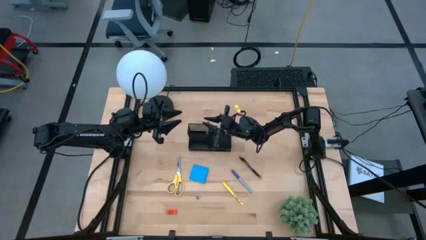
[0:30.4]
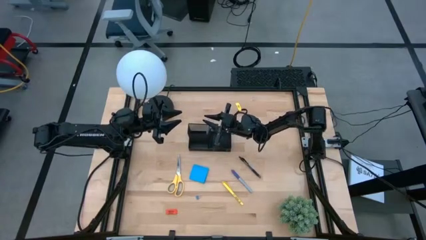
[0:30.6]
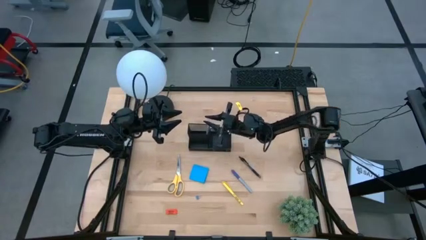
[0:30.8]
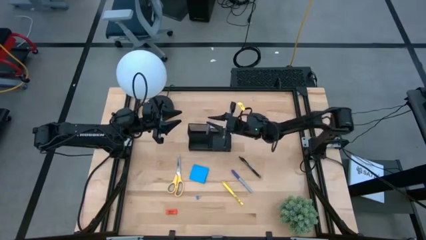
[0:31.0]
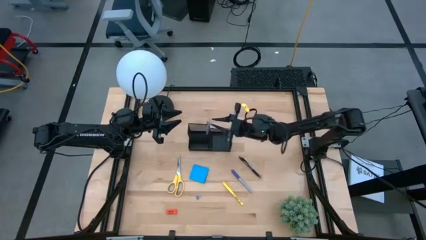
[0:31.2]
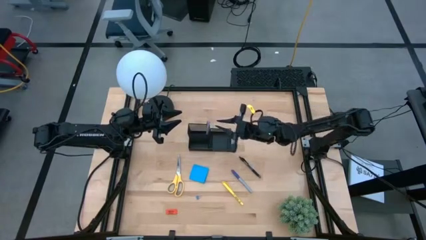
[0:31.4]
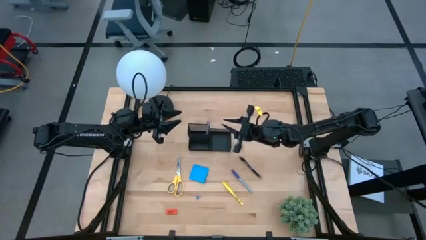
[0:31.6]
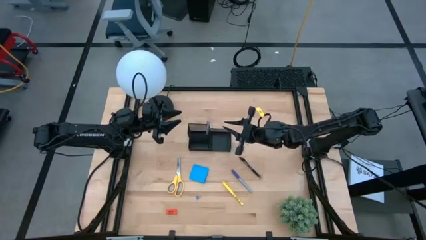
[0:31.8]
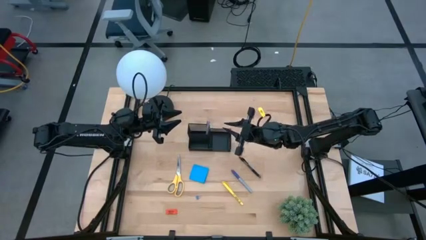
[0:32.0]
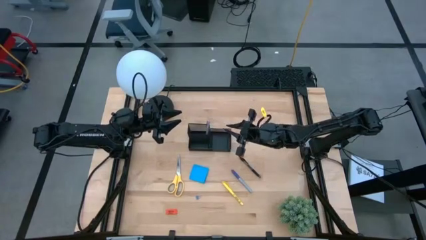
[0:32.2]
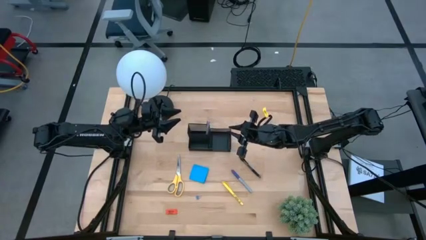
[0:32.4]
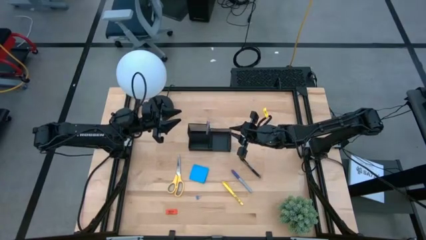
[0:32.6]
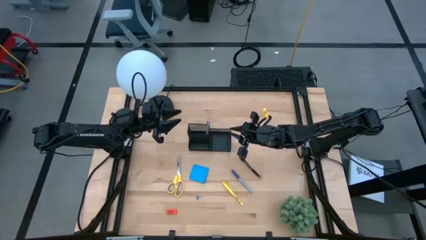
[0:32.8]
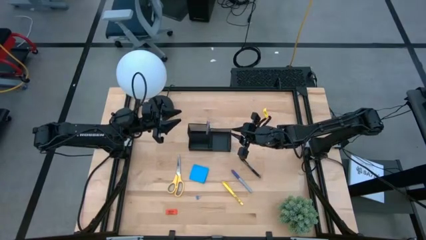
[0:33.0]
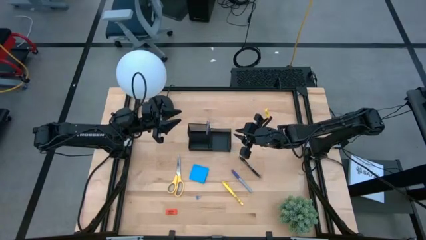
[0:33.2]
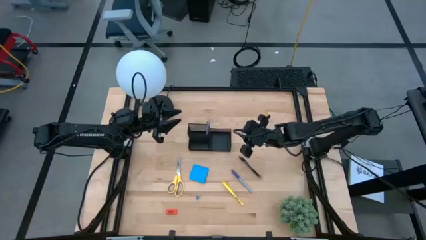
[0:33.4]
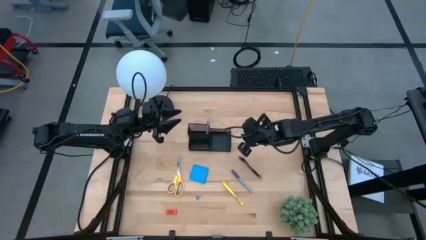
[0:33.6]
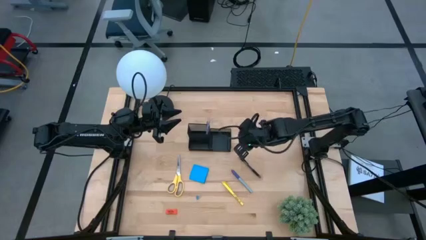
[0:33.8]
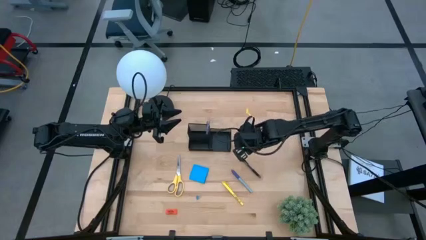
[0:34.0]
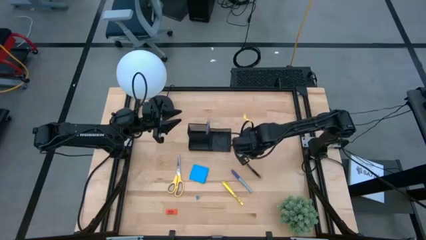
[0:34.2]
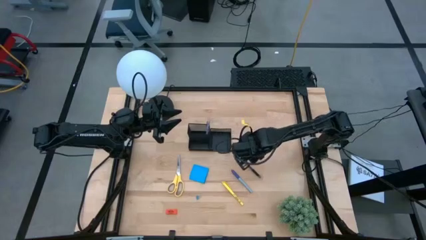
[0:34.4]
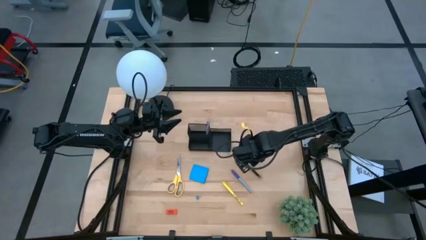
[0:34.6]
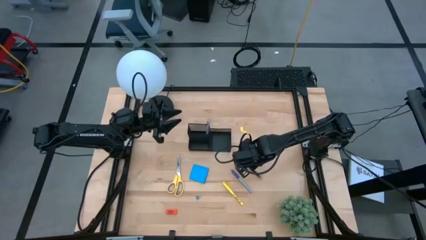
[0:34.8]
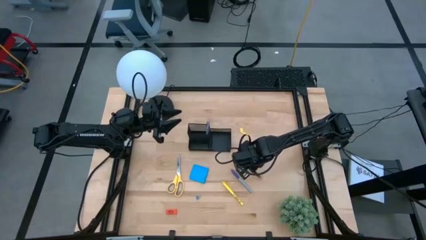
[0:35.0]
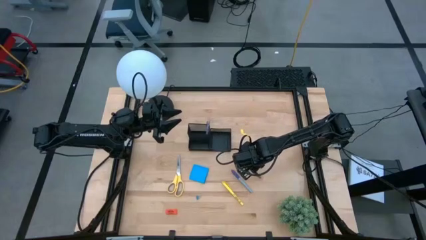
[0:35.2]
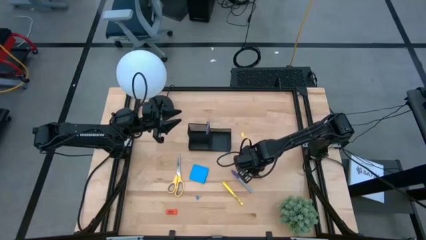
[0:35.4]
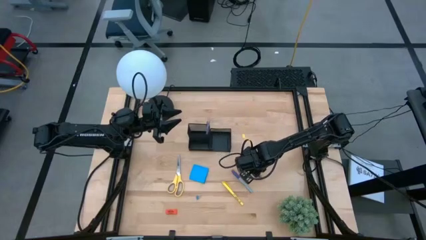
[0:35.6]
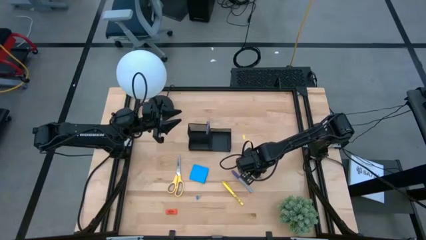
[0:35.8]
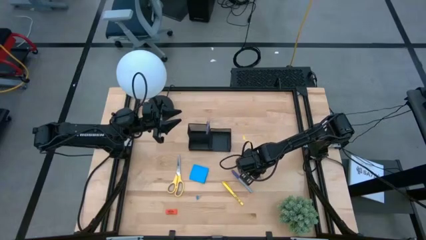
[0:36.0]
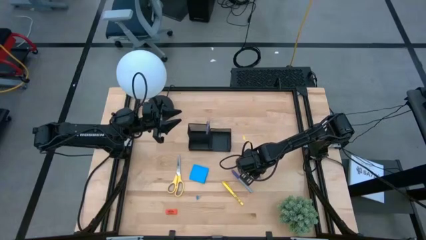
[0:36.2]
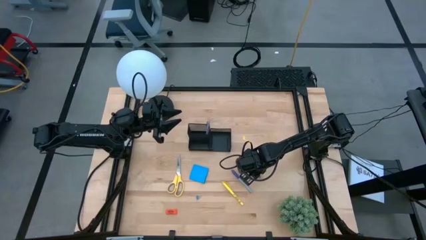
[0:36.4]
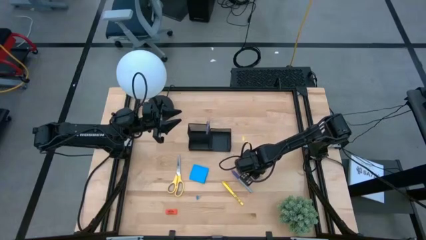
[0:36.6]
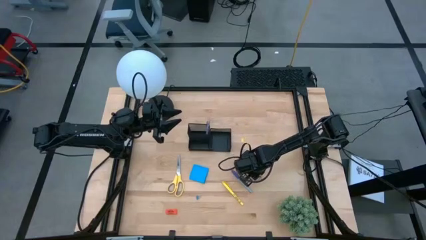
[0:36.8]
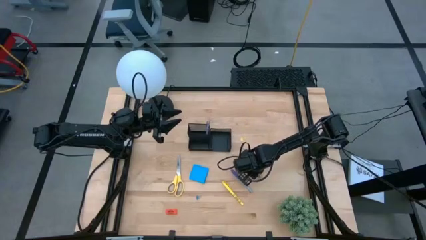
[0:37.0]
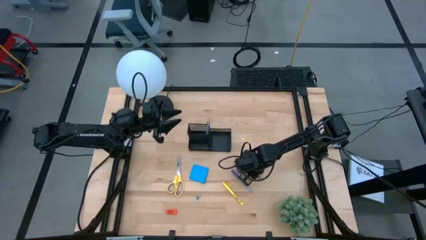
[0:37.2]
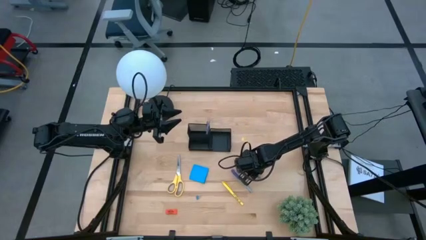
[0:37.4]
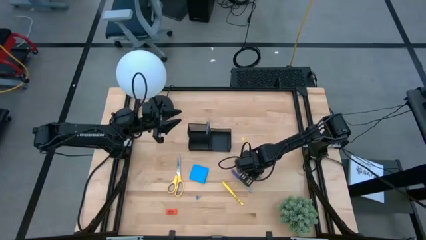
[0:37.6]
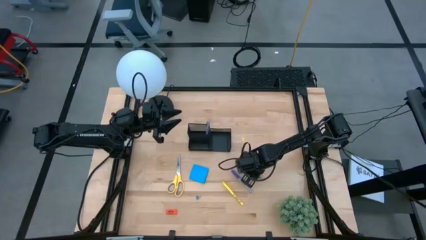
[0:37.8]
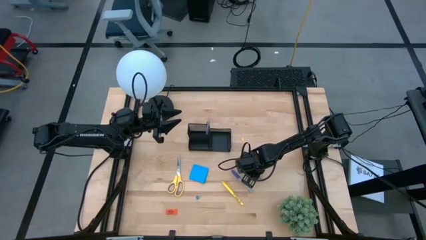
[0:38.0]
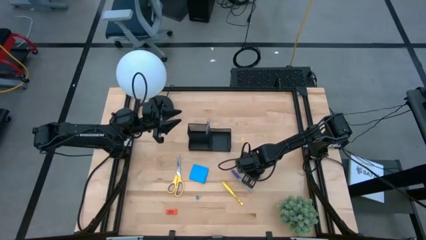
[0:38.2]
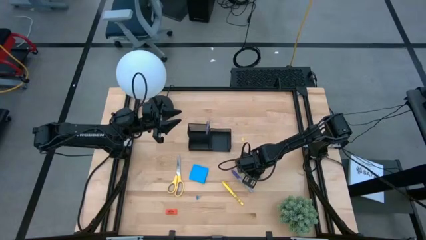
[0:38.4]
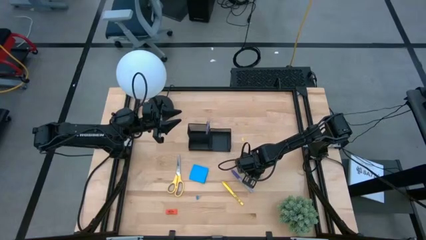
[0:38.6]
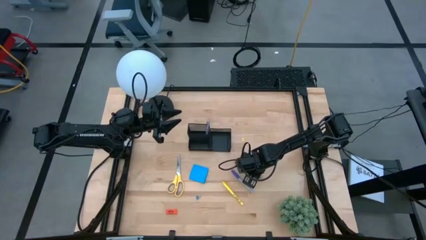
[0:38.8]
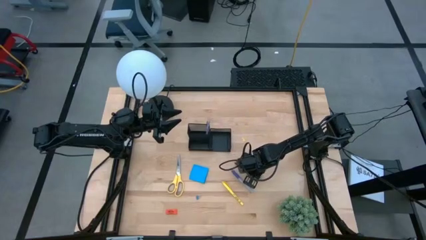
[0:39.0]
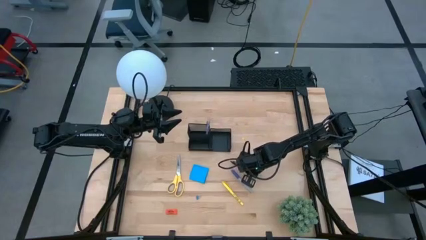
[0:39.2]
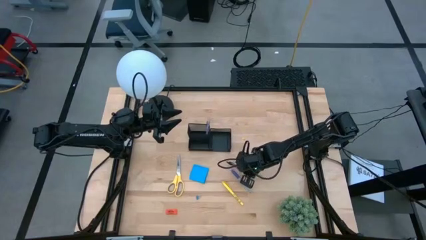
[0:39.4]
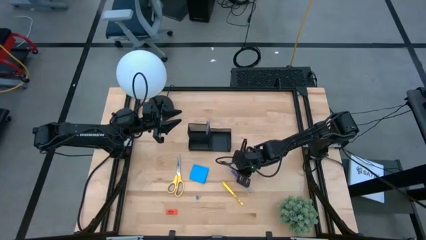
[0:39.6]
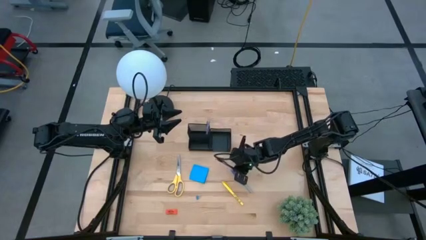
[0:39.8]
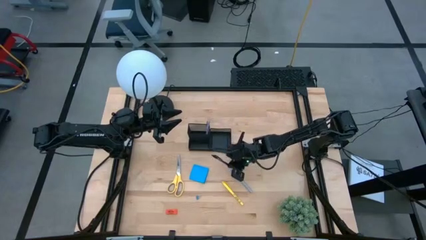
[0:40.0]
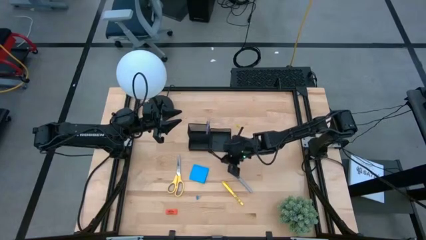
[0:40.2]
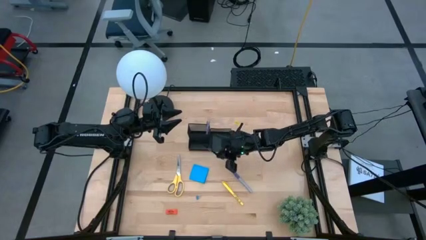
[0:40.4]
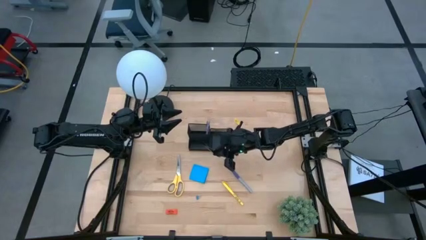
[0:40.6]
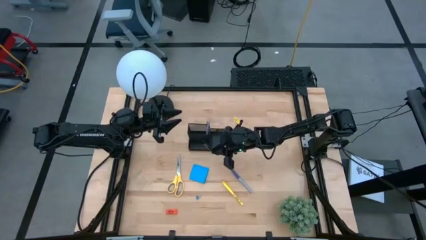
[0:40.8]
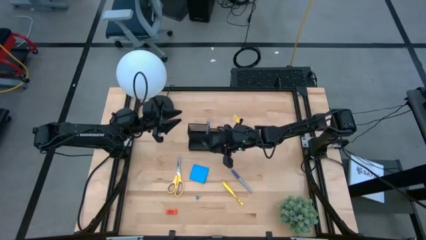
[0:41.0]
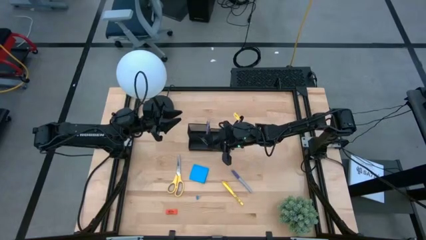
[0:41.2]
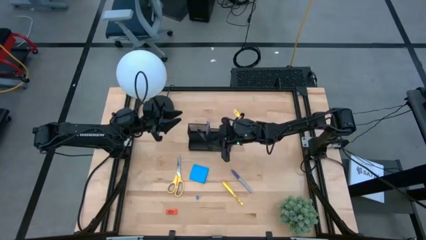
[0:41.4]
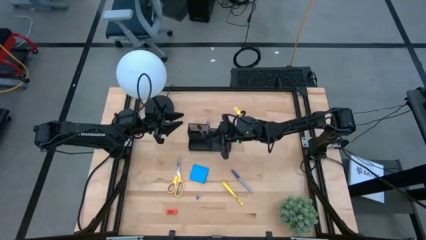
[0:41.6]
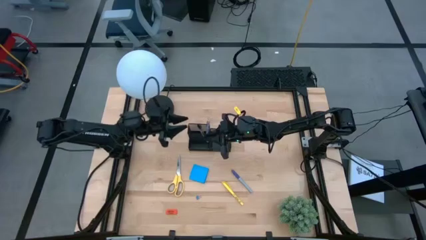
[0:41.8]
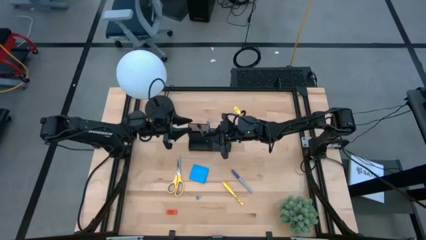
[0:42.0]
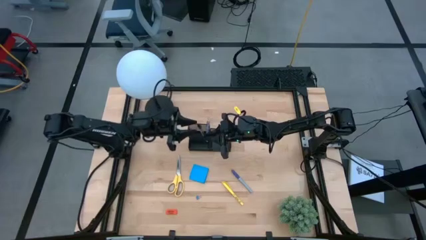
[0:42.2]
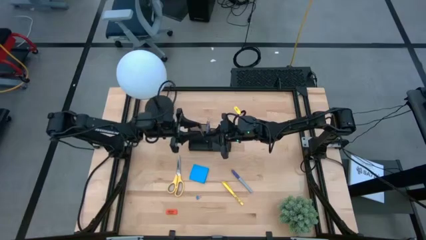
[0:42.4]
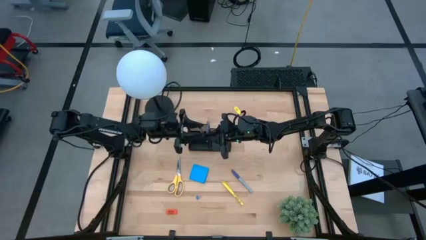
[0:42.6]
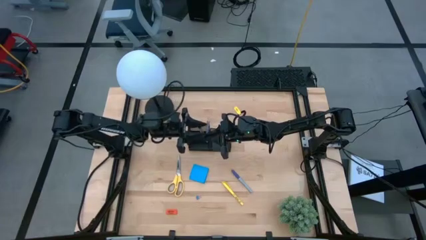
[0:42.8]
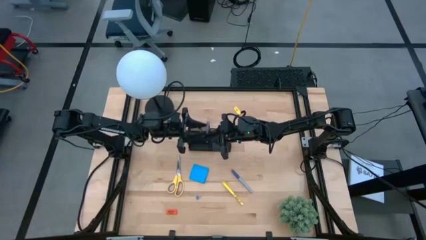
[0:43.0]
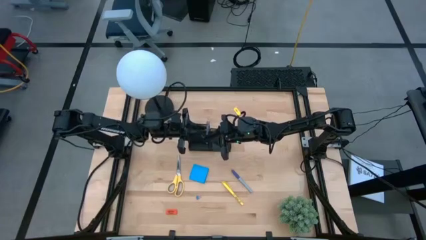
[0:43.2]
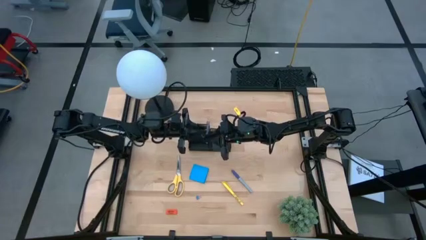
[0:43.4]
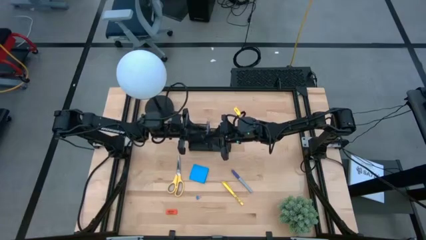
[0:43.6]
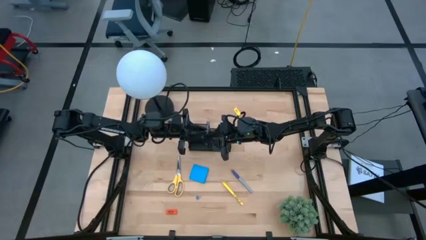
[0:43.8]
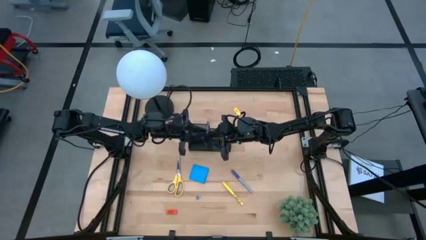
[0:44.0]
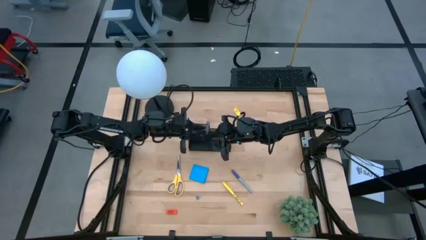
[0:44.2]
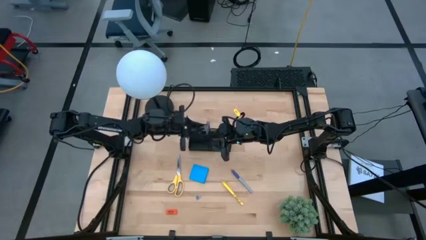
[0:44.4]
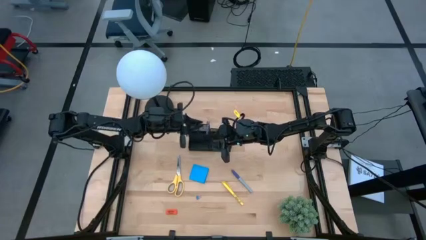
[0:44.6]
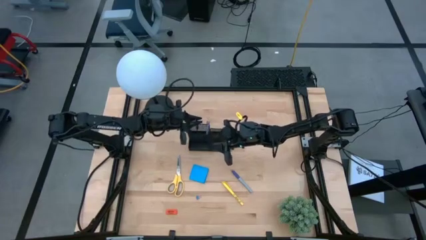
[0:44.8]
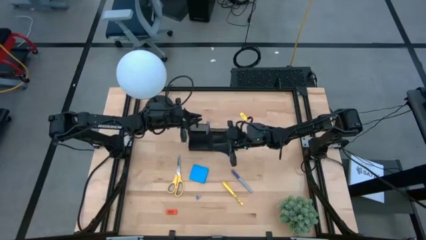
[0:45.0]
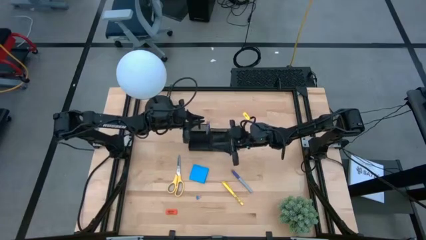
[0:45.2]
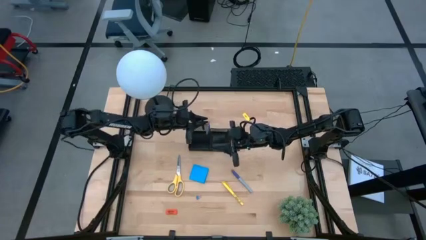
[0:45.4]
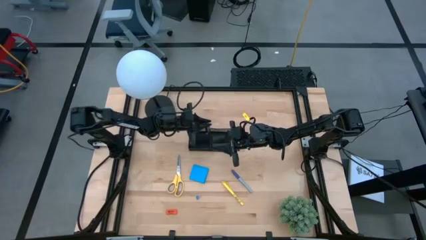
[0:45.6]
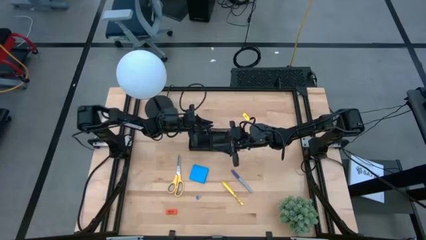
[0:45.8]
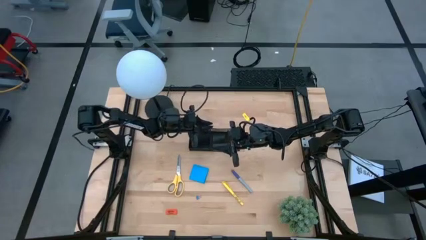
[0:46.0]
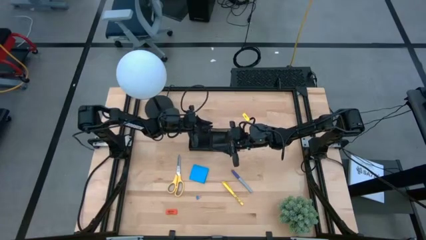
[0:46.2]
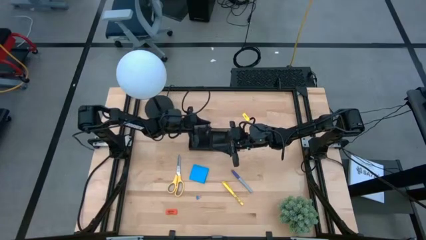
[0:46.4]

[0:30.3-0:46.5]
Task: Pick and place office supplies into organizer
Put the black pen into the black mesh desk organizer
